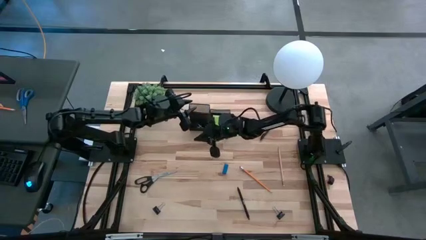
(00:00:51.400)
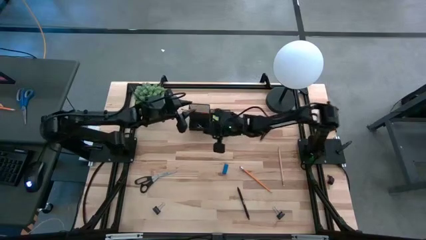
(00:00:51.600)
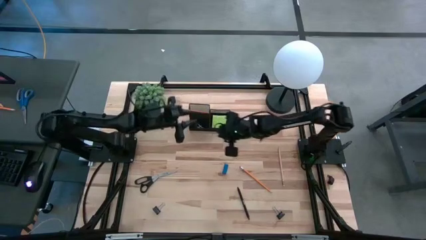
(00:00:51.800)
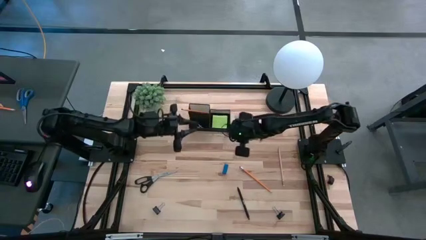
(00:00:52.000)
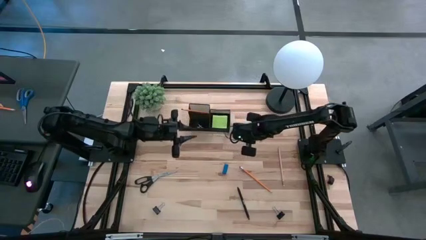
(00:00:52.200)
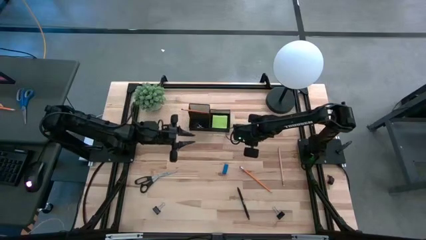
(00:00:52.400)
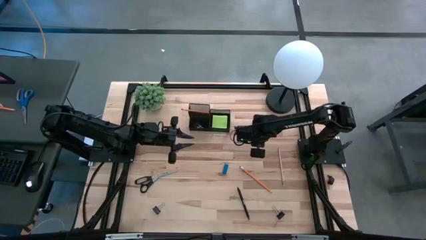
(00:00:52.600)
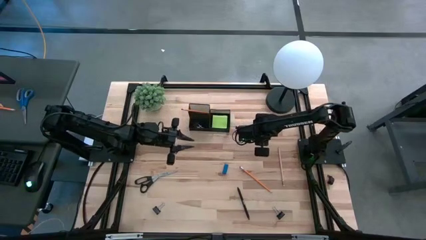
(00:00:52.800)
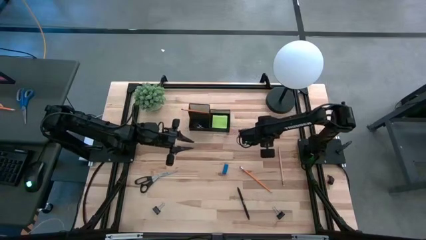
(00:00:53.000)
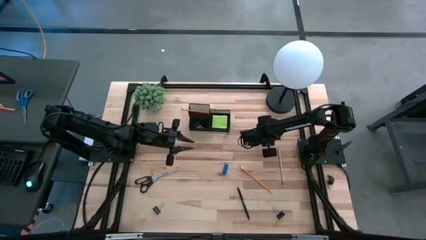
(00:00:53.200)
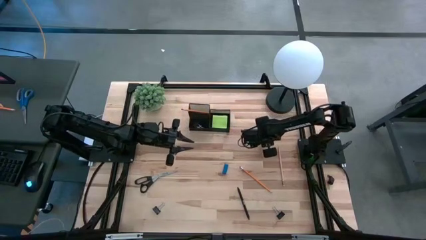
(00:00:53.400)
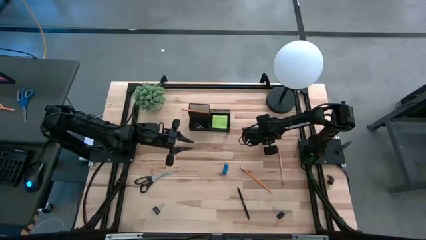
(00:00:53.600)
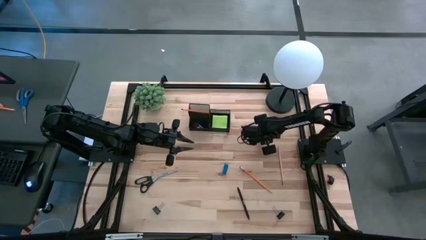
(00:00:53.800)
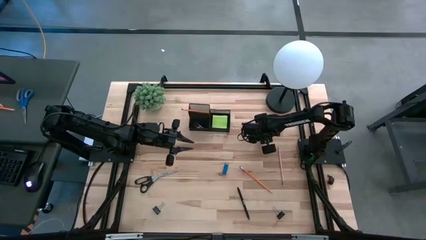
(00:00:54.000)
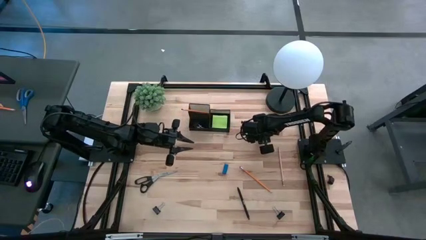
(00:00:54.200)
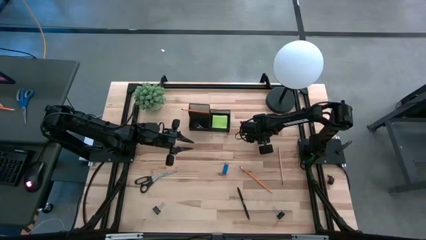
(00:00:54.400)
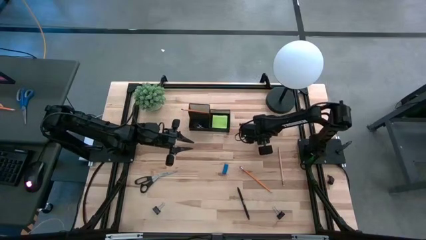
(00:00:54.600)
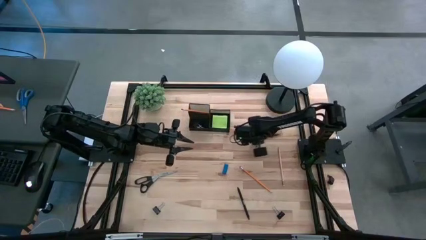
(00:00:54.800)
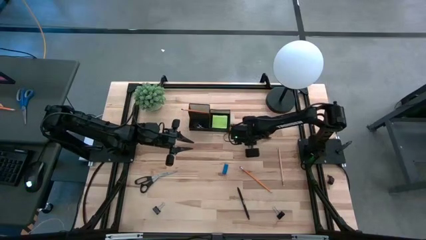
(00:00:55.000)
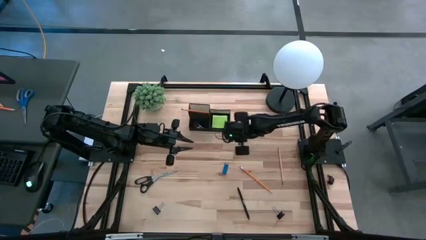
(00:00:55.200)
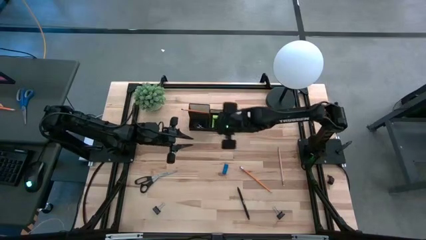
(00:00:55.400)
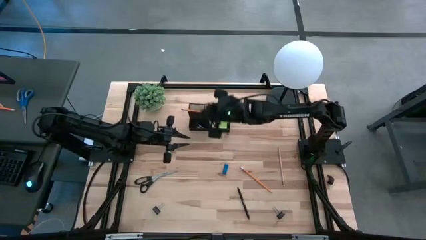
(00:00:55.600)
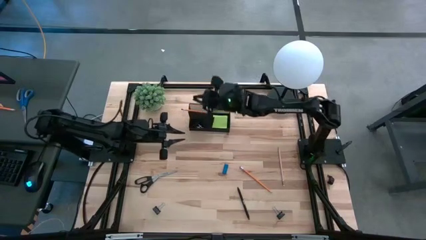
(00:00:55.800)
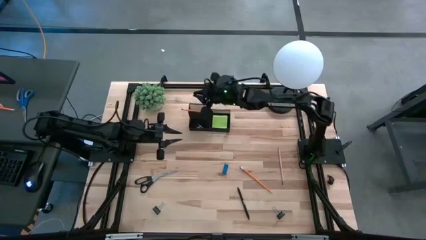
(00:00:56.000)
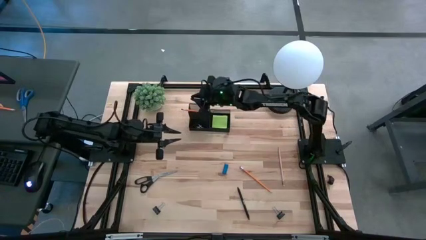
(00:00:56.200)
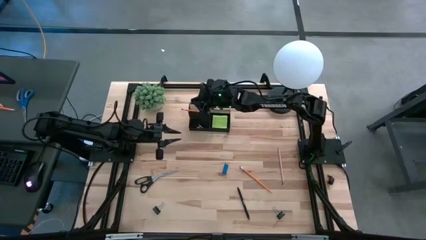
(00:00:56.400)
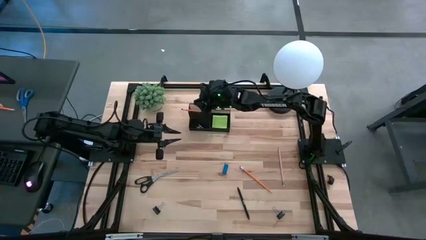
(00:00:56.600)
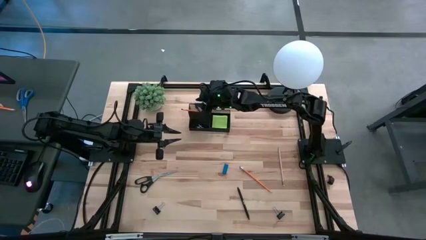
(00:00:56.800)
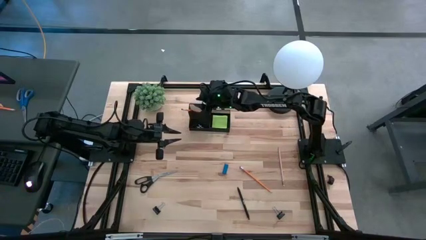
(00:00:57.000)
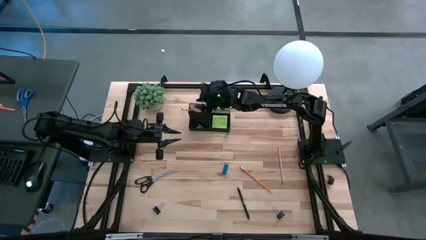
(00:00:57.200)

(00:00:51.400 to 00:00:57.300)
Task: Pick and place office supplies into organizer
Put the top black ballpen into the organizer bin

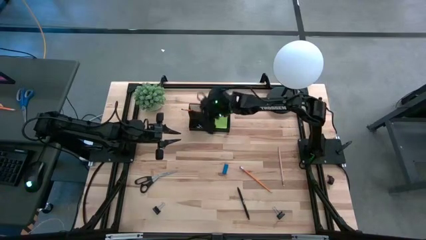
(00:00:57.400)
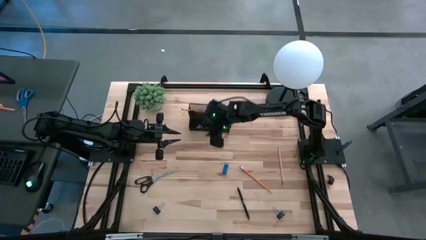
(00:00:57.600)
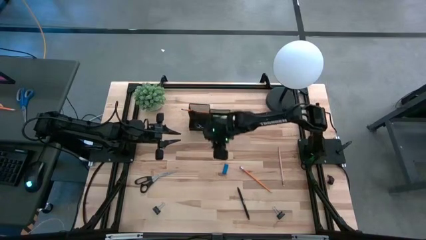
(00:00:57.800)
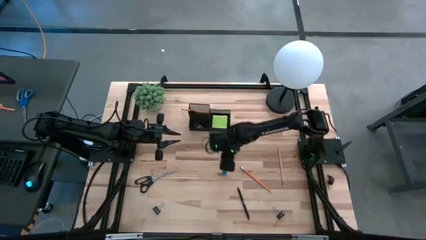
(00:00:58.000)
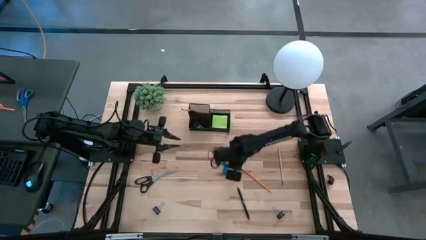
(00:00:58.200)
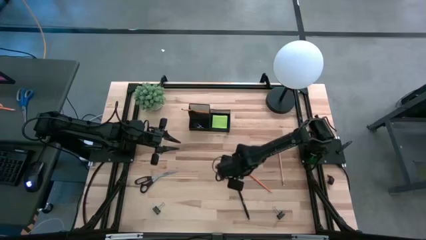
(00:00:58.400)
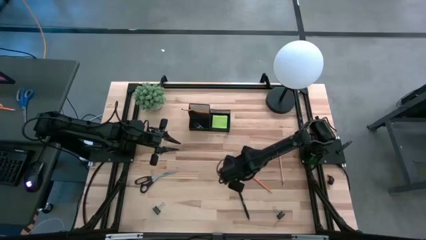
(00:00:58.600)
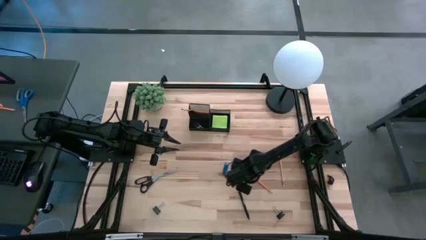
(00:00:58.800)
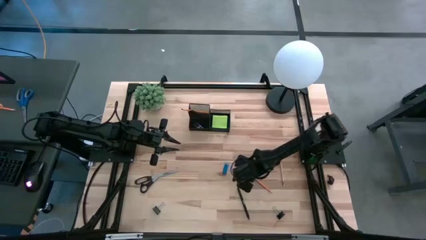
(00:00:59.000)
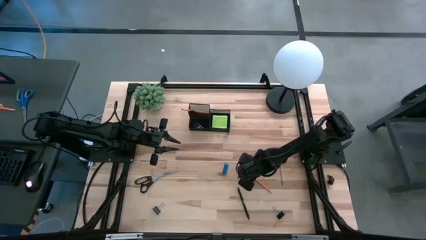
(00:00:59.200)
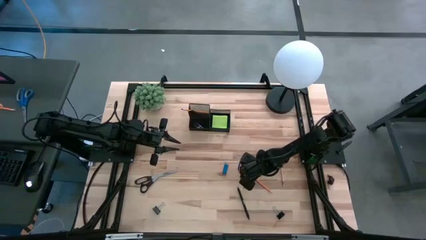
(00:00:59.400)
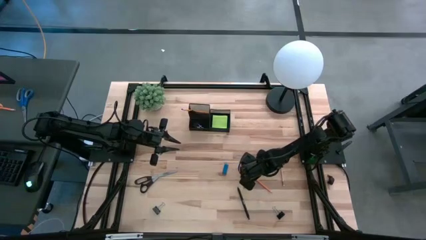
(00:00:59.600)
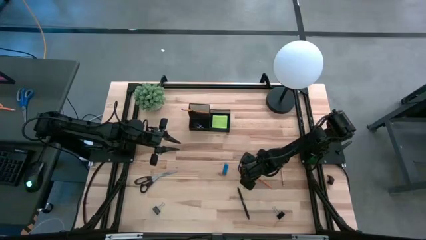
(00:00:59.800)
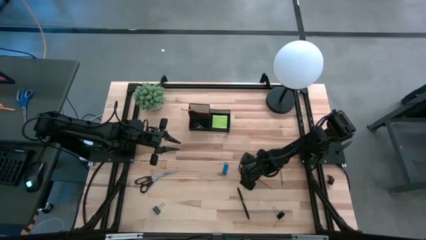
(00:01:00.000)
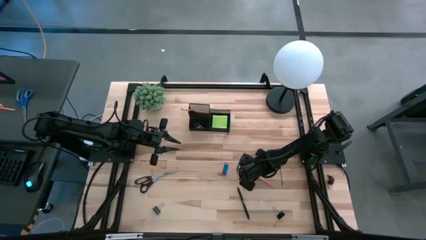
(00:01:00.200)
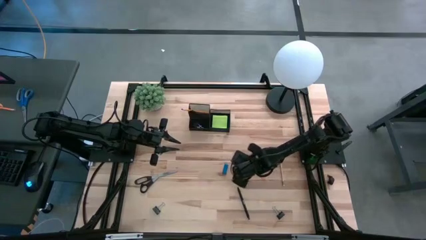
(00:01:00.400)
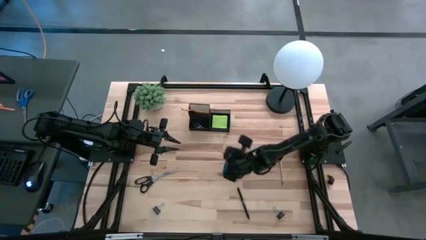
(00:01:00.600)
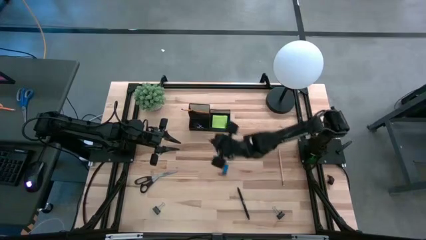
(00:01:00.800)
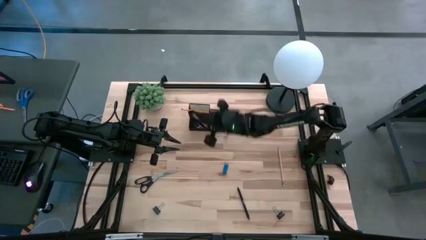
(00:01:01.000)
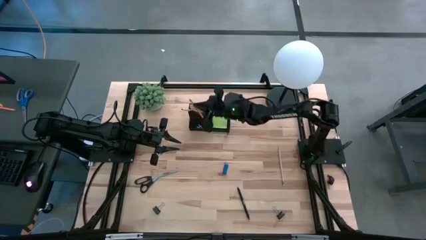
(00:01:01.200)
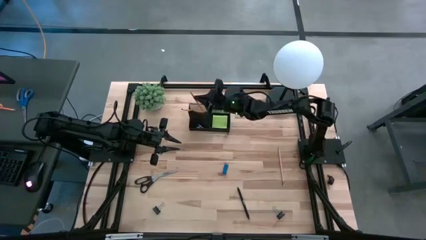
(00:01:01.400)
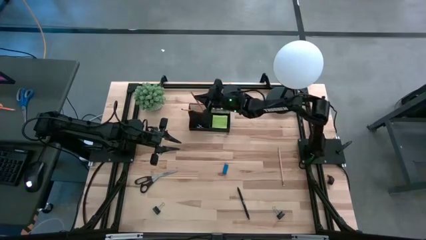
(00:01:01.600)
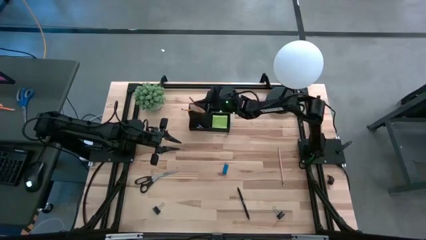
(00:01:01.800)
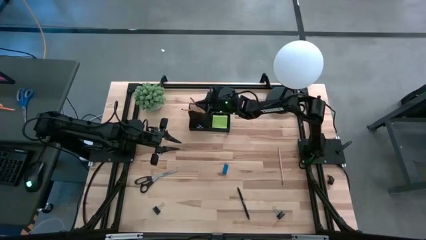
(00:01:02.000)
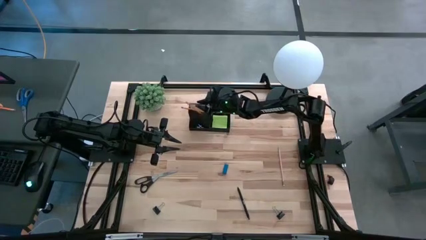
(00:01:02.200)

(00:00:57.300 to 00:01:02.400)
Put the yellow pencil into the organizer bin

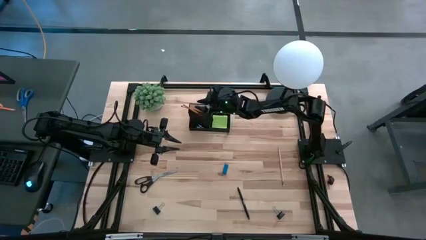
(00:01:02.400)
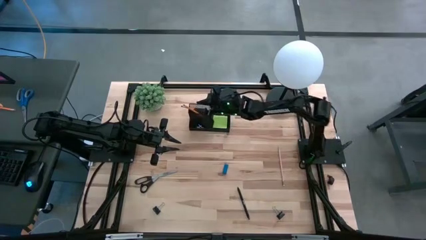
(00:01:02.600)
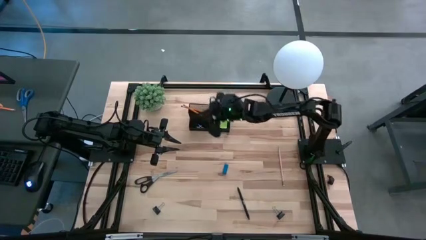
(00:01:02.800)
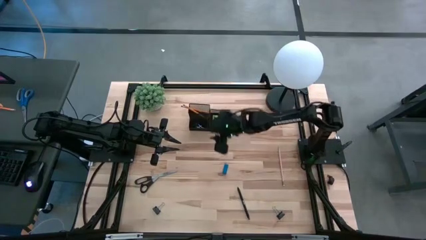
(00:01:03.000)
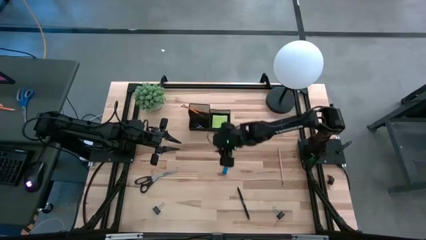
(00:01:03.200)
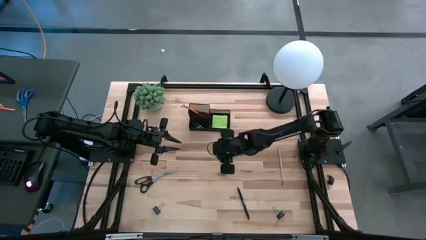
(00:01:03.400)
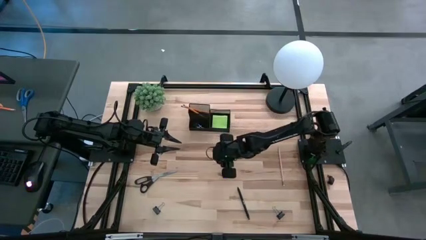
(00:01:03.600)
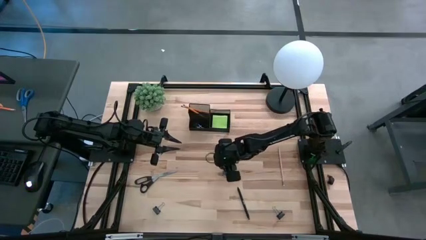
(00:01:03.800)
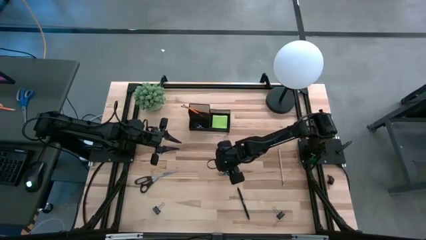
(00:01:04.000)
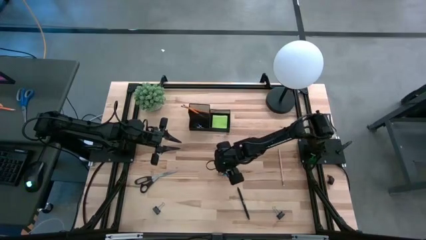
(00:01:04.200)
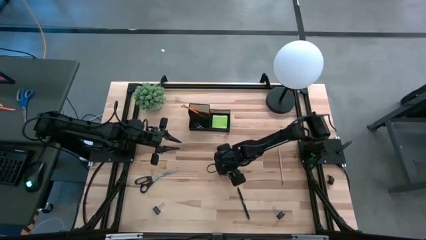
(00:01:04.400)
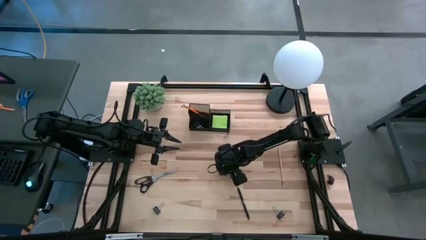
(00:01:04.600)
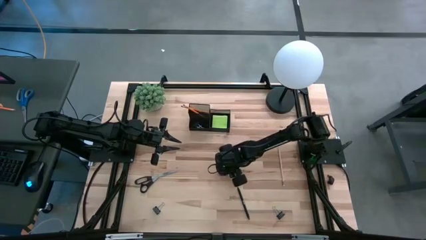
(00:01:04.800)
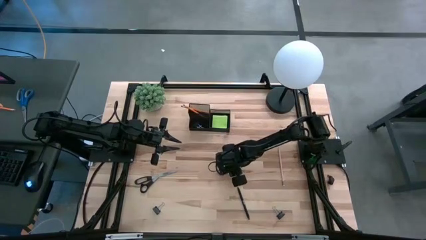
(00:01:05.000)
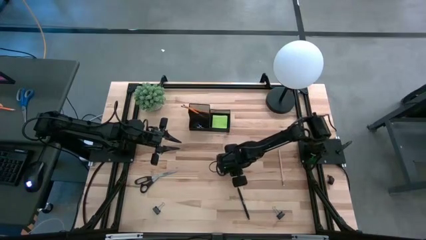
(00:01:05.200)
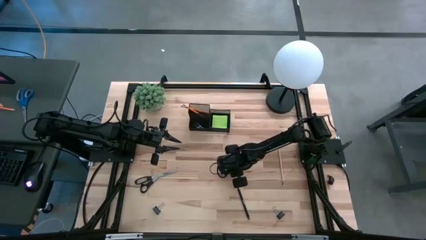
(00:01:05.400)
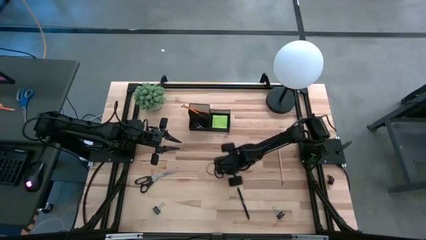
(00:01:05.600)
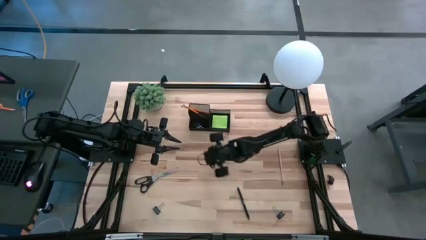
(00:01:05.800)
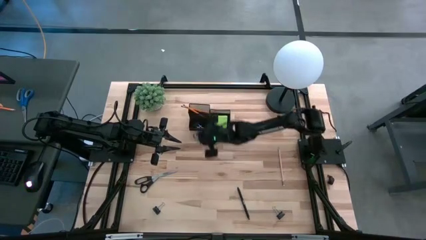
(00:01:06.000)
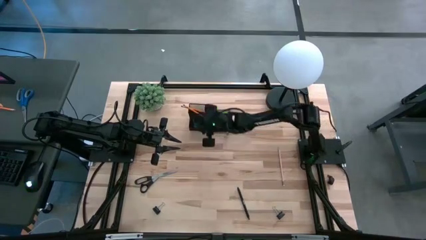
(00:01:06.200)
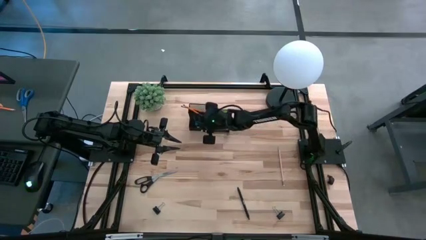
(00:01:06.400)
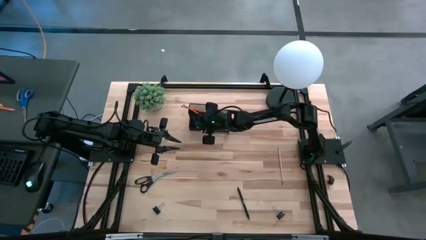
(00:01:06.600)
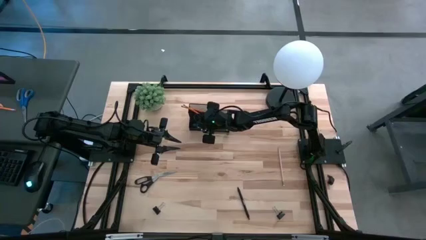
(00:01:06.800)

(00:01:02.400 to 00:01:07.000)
Put the blue eraser into the organizer bin
